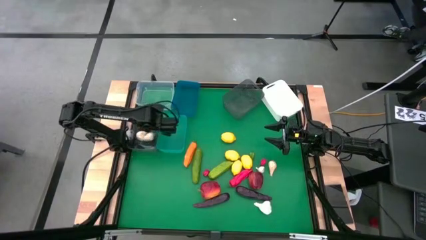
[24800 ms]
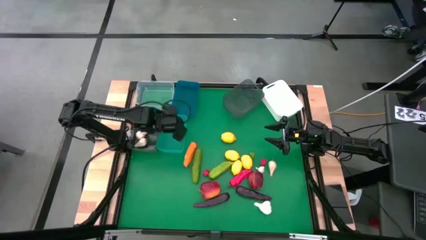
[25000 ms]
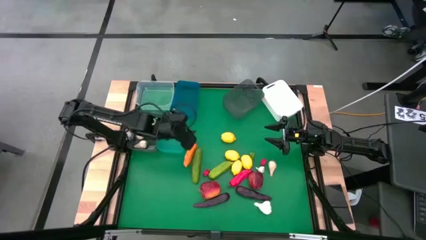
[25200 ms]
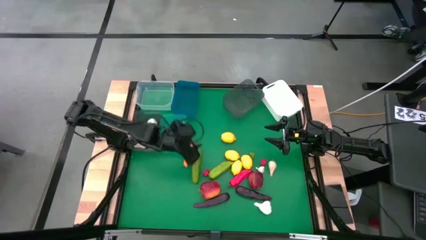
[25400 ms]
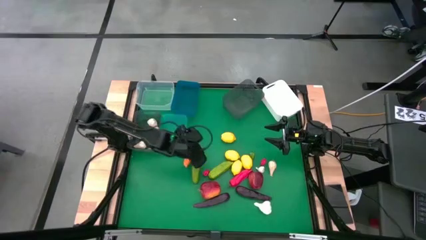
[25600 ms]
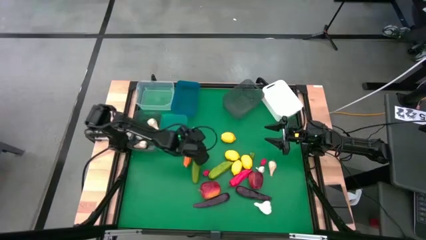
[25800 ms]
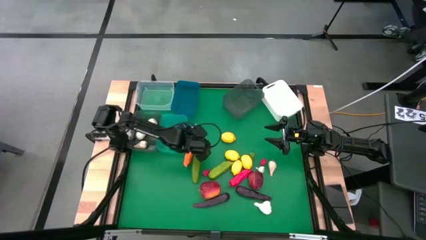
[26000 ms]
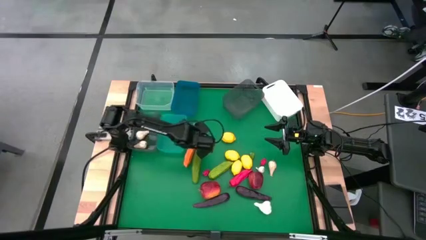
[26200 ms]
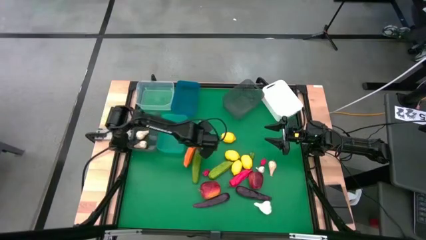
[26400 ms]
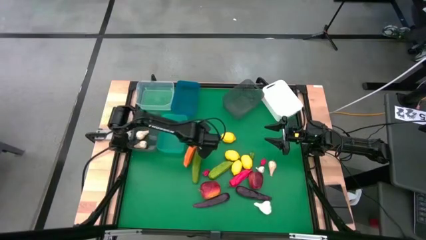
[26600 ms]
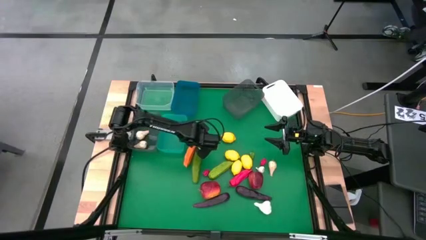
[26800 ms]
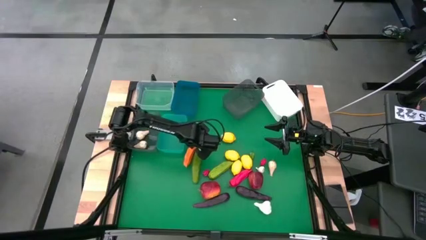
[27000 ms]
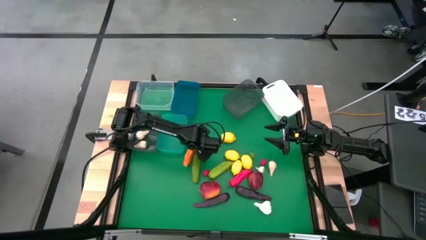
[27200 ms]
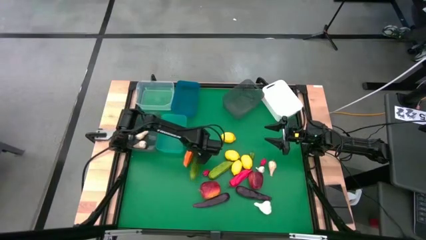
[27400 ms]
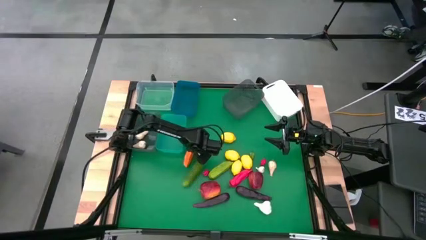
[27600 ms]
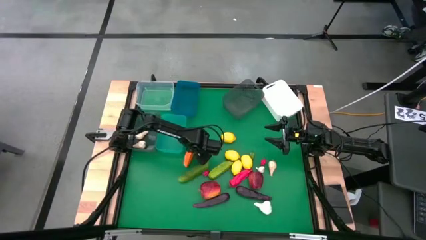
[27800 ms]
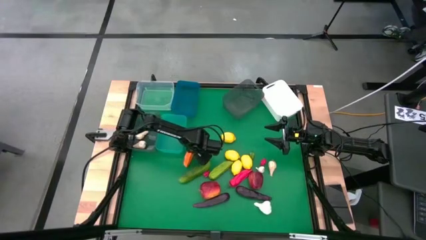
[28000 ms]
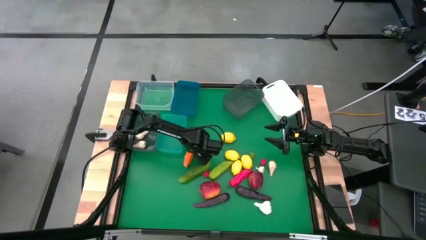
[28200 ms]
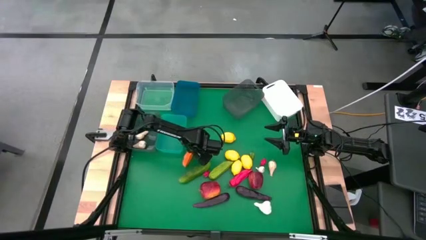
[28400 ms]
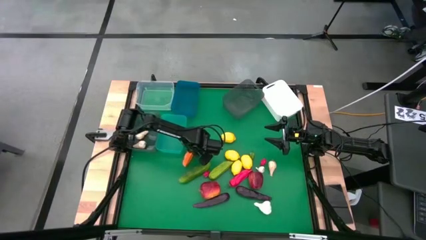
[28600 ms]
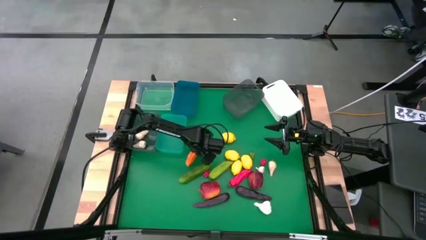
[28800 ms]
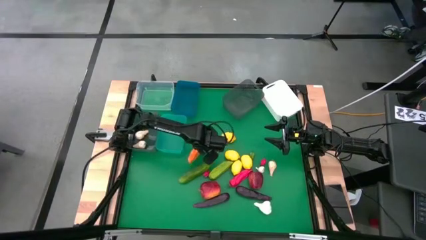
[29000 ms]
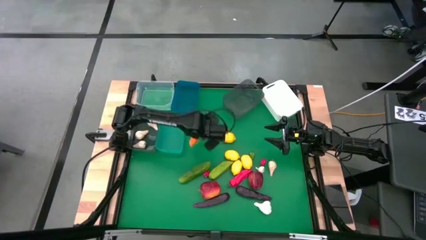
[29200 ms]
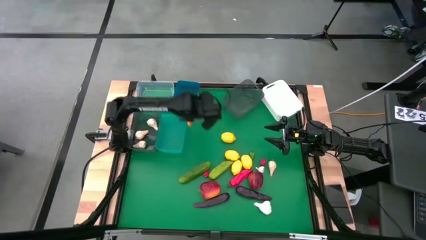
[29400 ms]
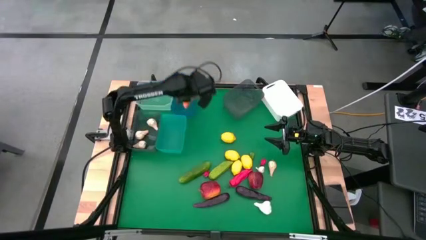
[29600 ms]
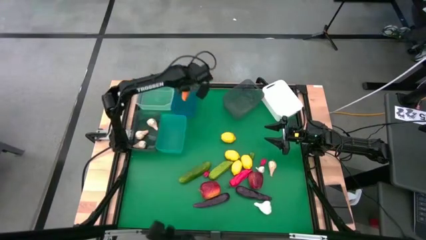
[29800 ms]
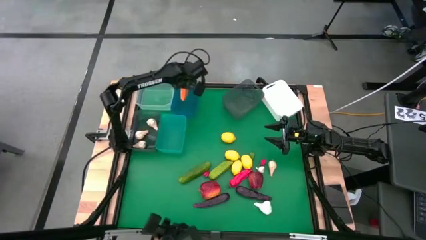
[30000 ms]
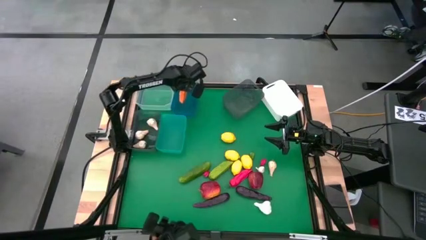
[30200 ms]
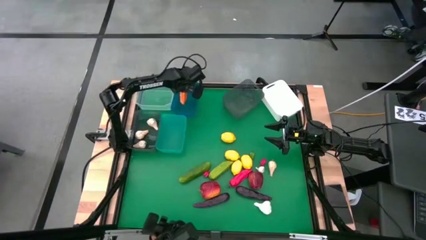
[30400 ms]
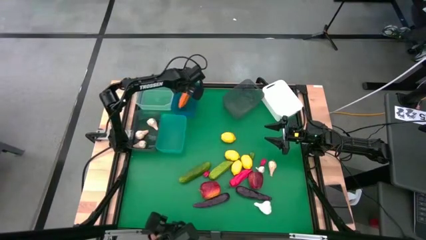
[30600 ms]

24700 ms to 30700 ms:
Task: Sort produce into baskets
Put the orange pepper into the blue bin

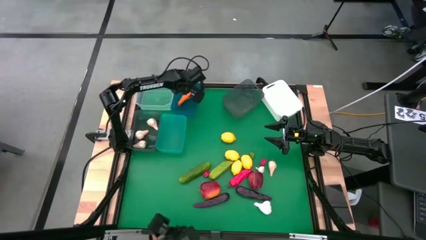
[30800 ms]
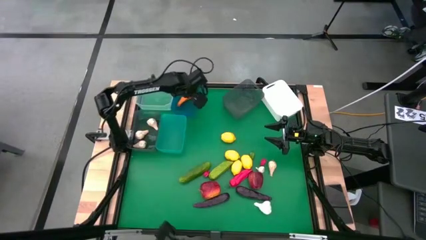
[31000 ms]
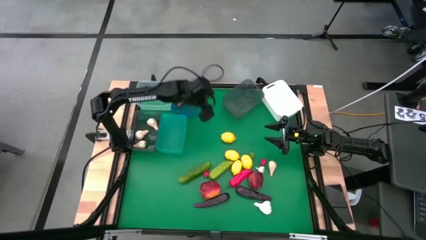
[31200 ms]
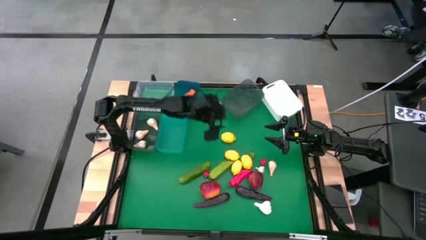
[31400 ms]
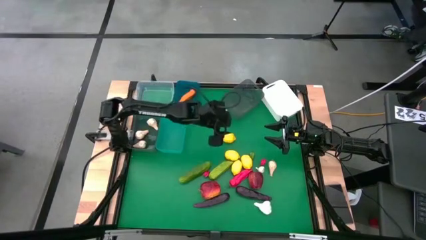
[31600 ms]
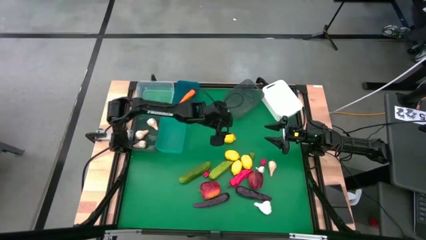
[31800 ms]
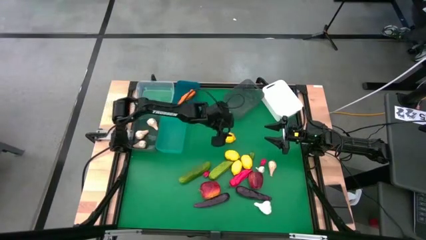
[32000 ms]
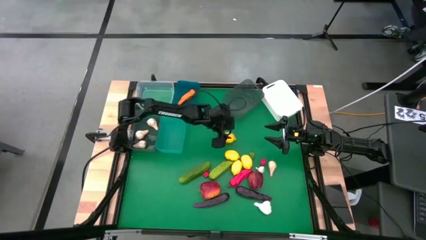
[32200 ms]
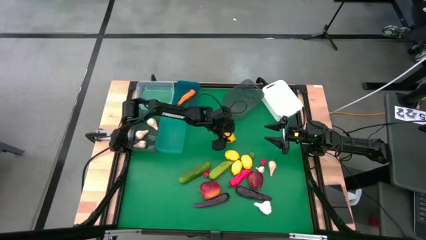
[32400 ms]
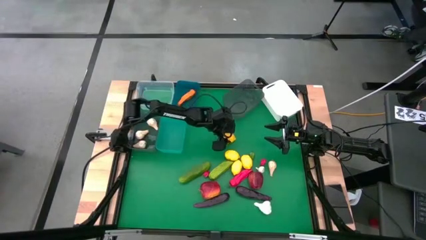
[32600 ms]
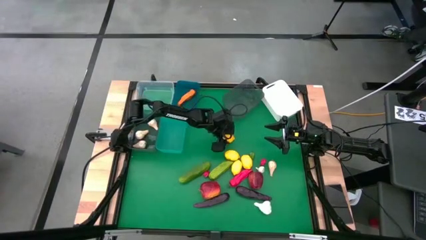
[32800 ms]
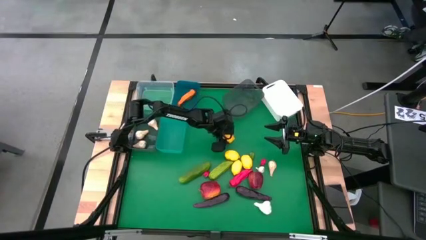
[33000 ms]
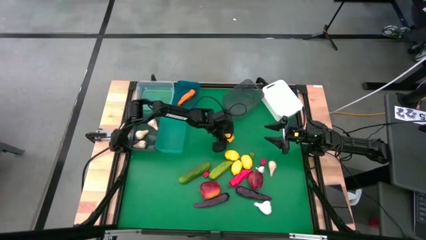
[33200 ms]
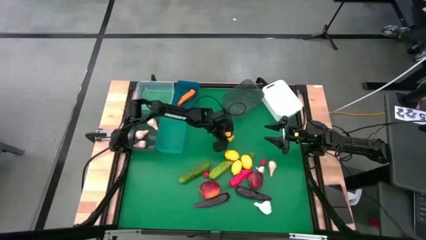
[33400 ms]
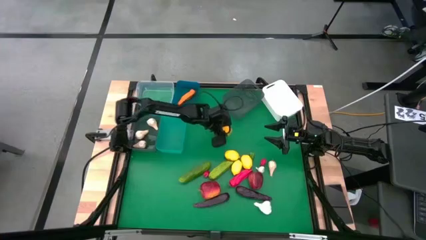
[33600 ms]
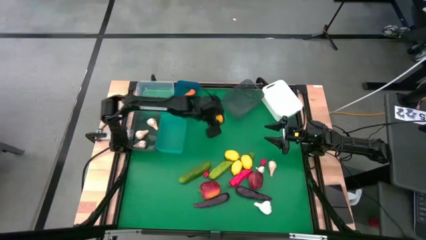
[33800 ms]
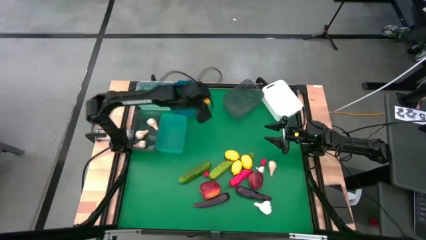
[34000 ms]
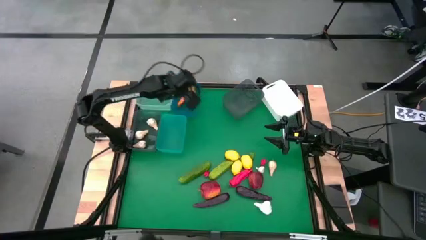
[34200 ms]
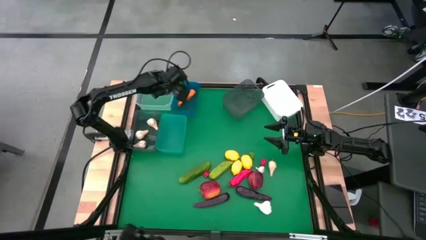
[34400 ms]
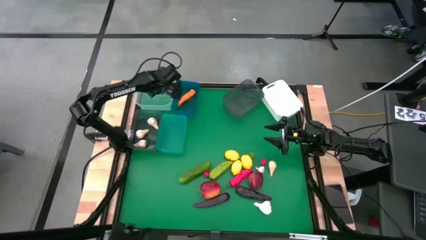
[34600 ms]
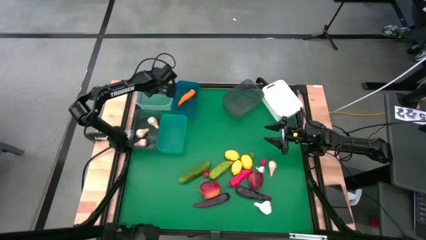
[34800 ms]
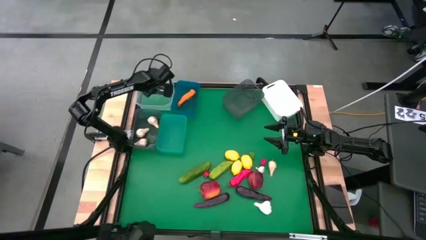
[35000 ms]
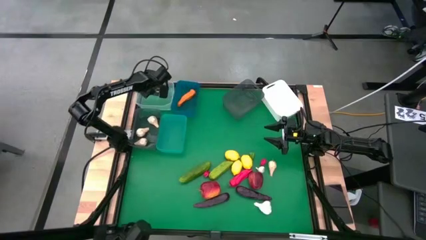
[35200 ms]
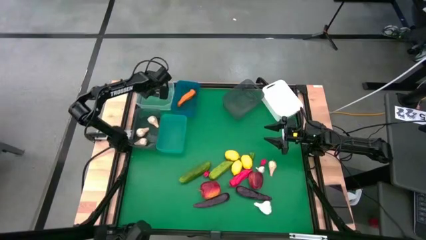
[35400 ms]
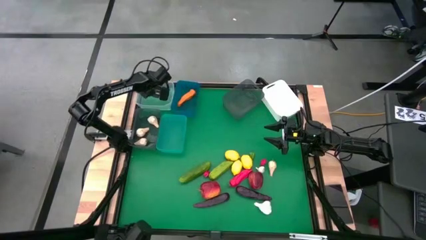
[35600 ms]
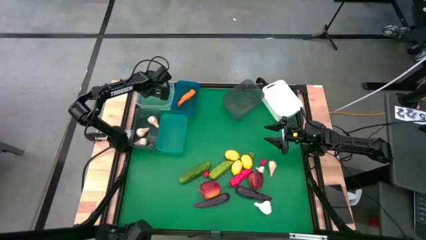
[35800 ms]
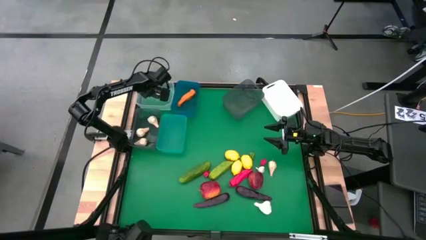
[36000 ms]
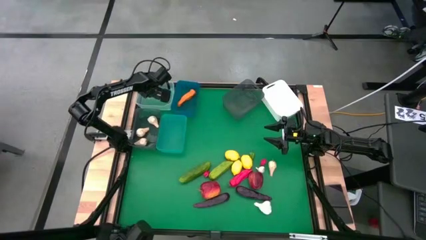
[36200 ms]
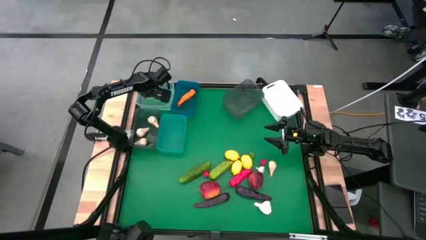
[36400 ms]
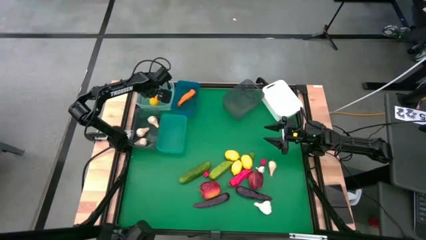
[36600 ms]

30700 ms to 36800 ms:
Put the yellow lemon into the transparent bin

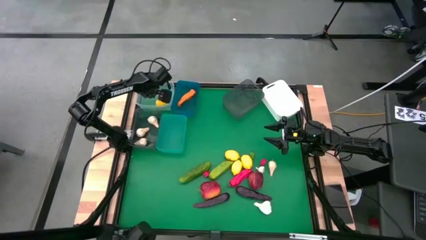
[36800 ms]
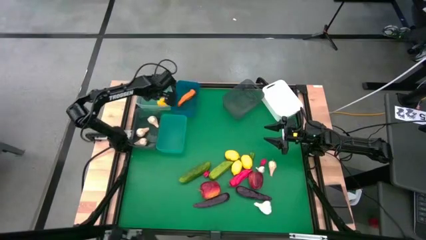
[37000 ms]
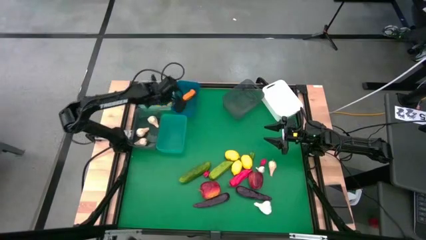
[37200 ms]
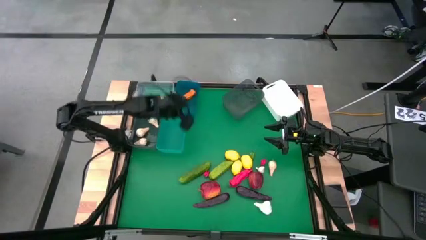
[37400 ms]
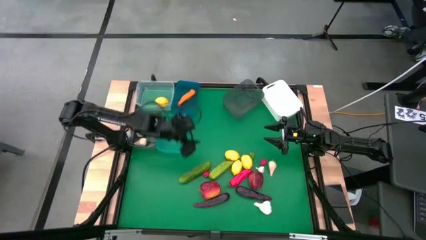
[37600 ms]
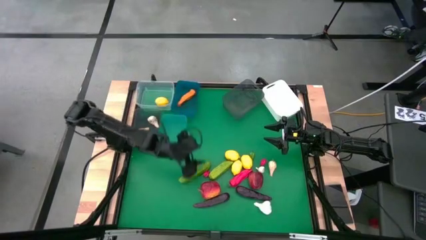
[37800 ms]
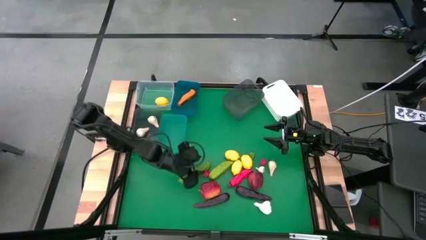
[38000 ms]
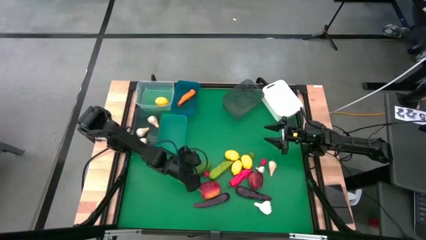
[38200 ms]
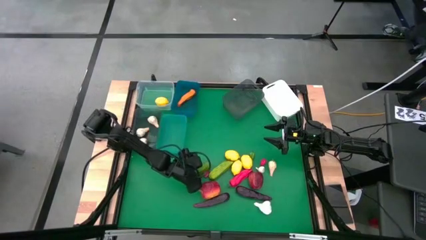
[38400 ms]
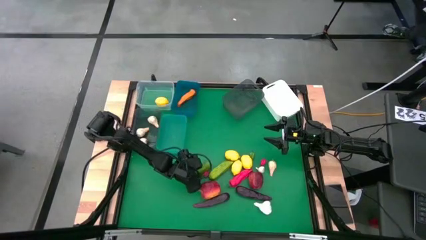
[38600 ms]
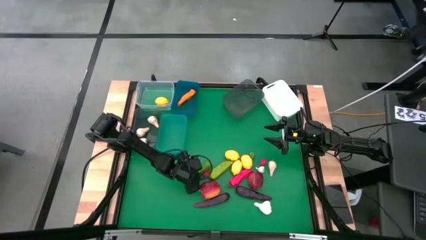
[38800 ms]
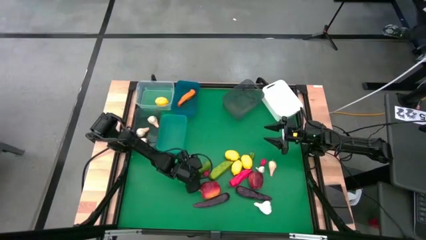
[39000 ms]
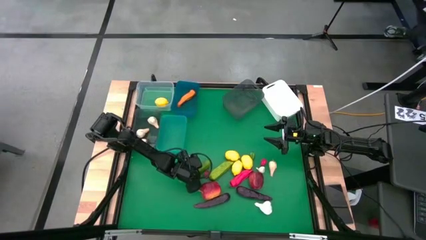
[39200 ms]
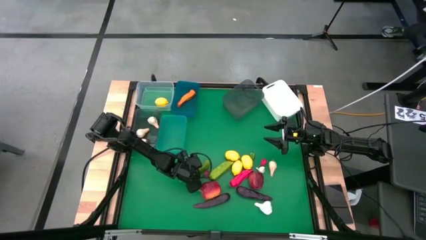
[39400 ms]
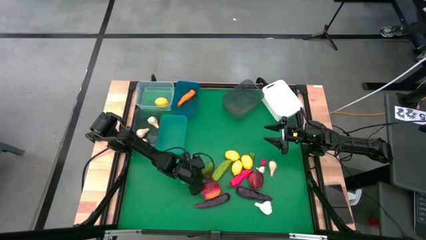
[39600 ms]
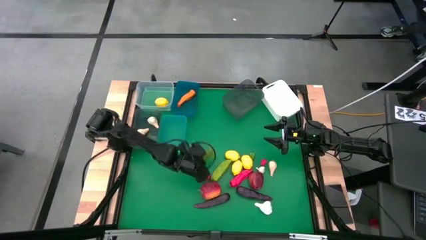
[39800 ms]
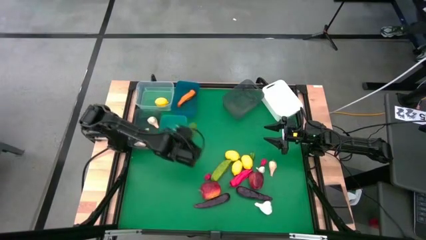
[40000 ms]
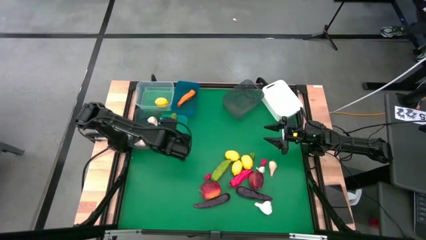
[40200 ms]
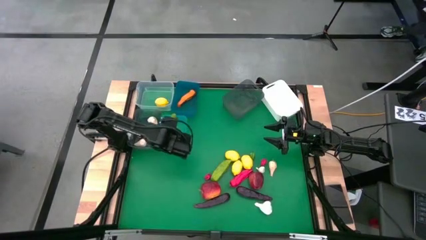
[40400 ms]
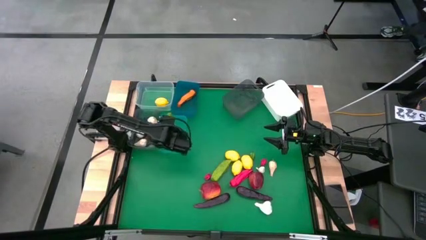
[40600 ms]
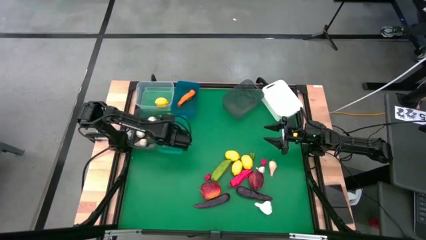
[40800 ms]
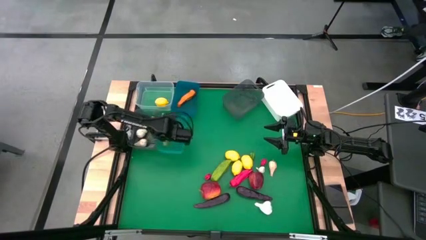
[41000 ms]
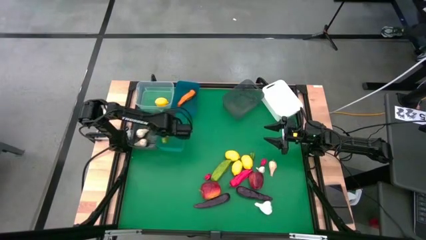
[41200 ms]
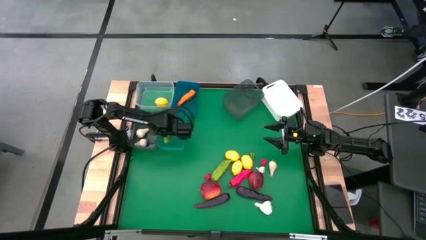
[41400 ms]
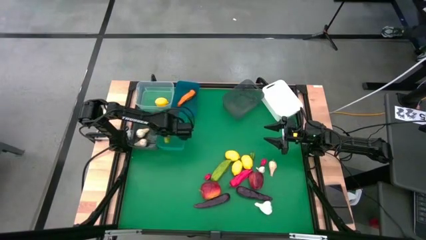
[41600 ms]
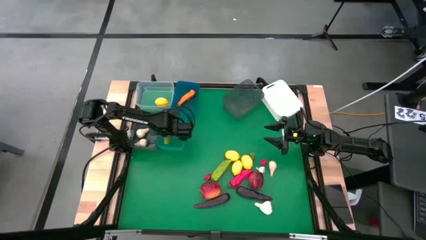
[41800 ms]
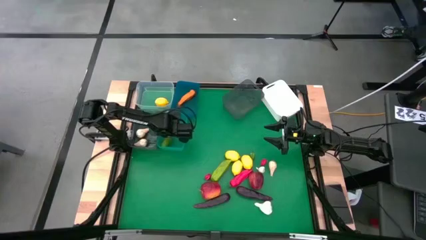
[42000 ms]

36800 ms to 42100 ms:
Put the green cucumber into the light blue bin
